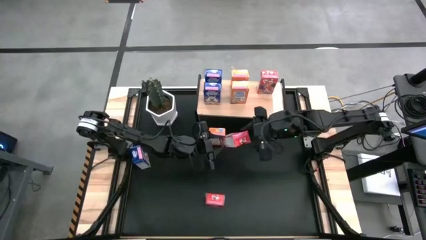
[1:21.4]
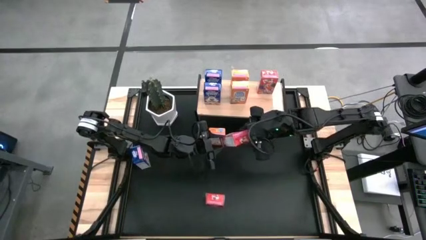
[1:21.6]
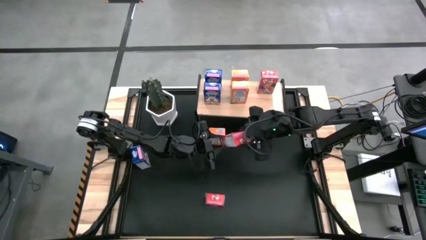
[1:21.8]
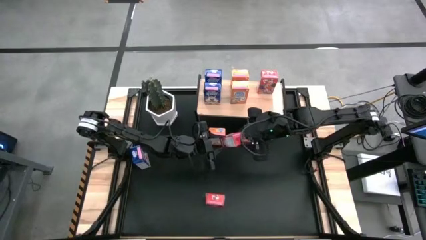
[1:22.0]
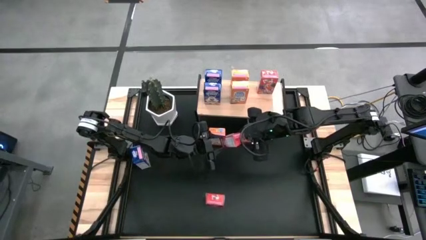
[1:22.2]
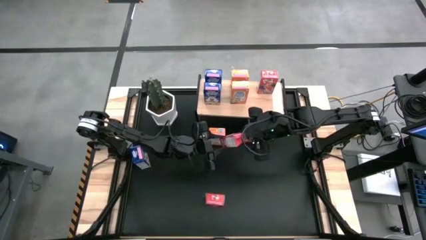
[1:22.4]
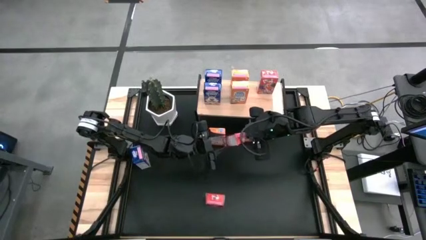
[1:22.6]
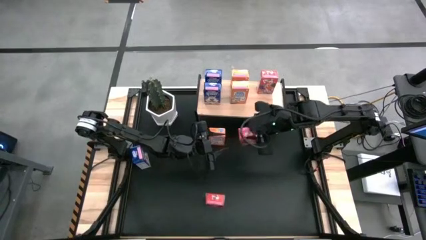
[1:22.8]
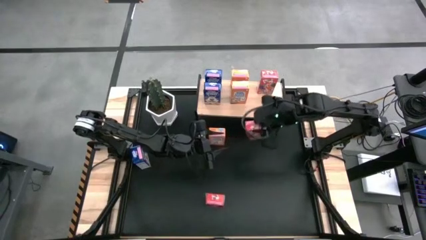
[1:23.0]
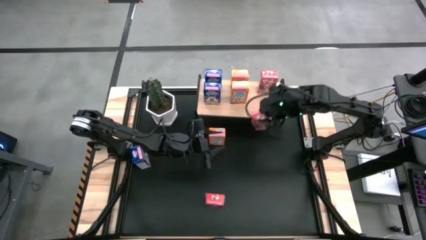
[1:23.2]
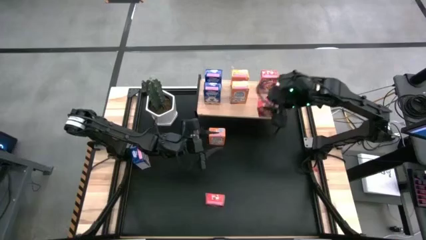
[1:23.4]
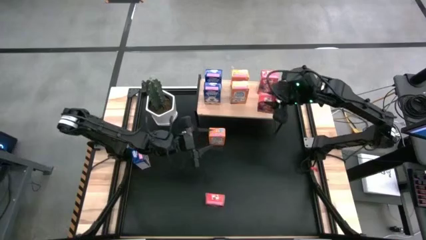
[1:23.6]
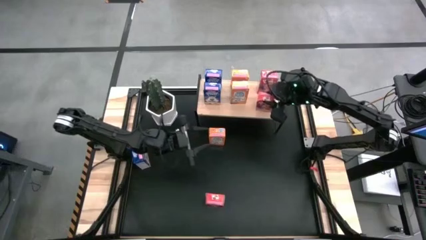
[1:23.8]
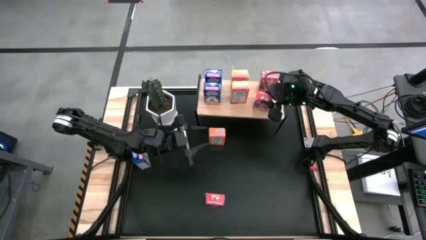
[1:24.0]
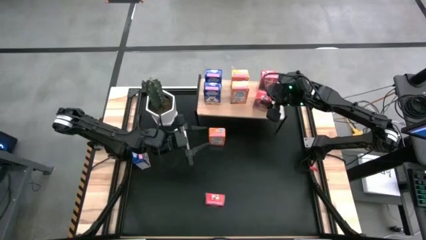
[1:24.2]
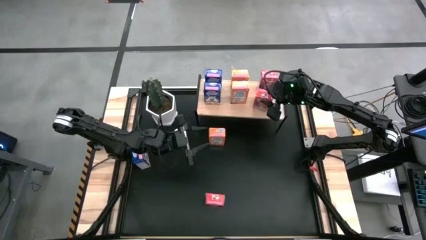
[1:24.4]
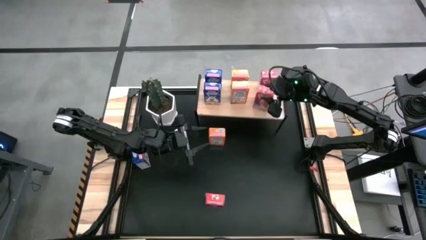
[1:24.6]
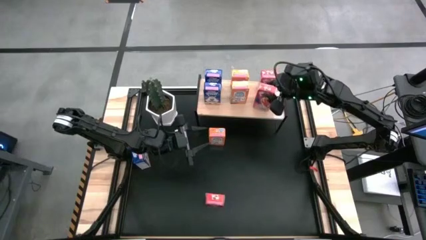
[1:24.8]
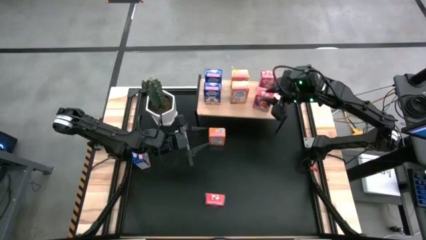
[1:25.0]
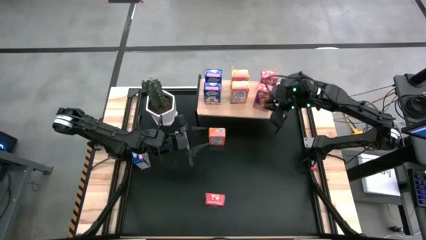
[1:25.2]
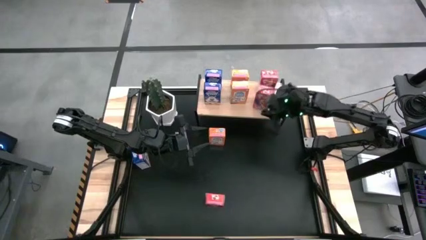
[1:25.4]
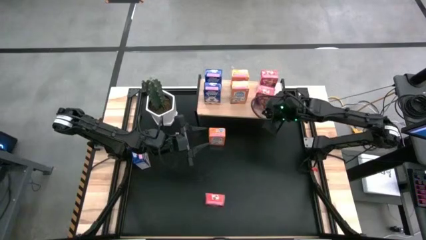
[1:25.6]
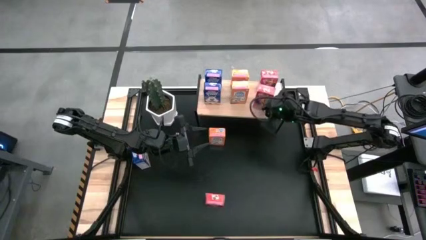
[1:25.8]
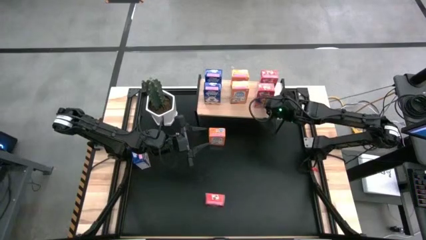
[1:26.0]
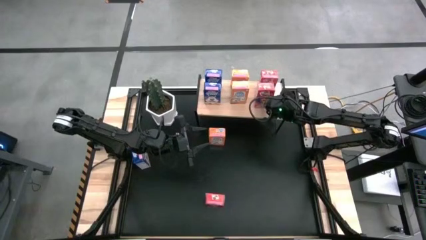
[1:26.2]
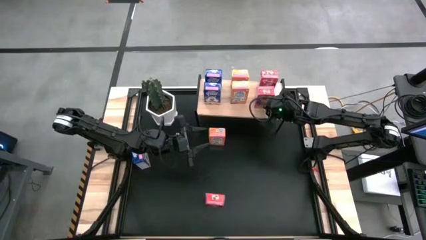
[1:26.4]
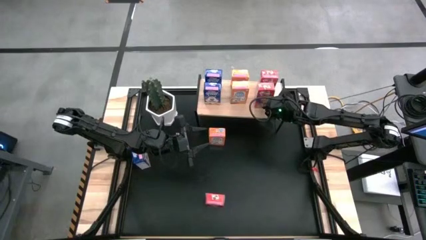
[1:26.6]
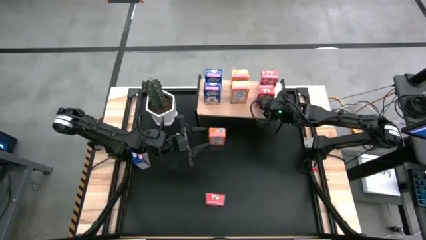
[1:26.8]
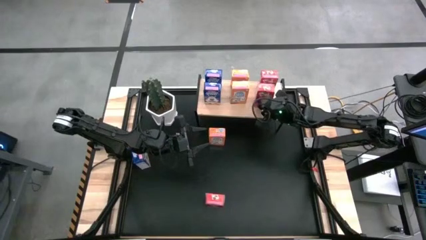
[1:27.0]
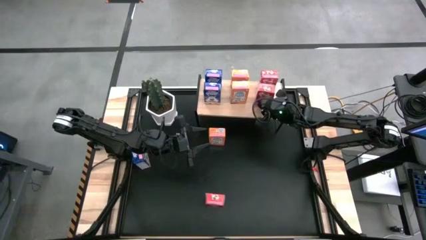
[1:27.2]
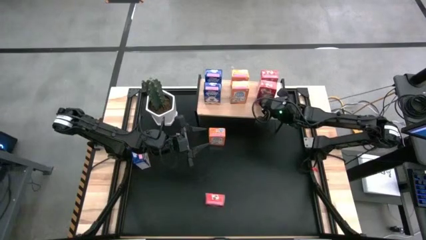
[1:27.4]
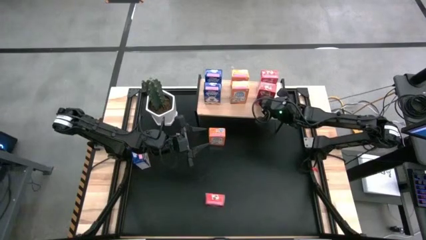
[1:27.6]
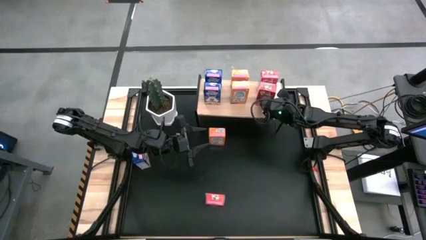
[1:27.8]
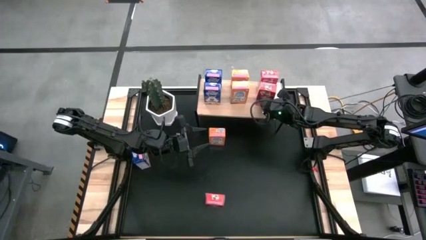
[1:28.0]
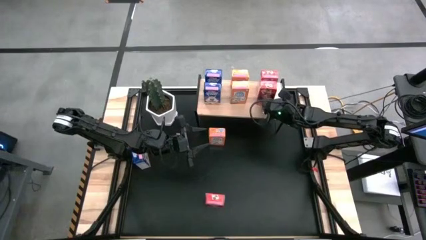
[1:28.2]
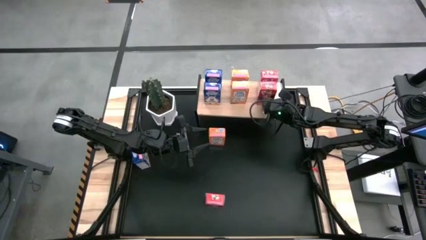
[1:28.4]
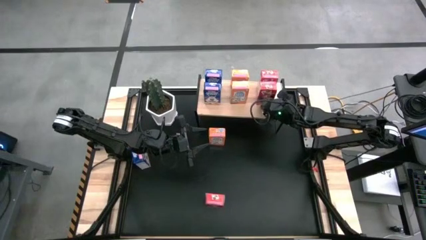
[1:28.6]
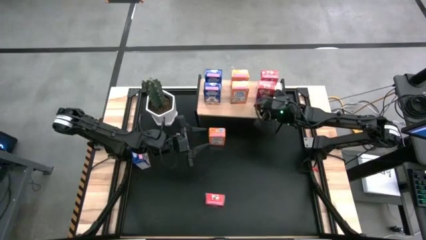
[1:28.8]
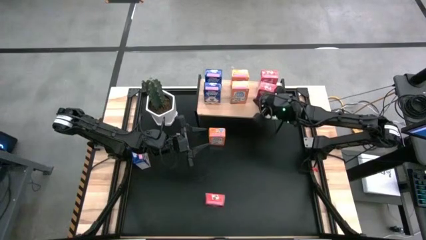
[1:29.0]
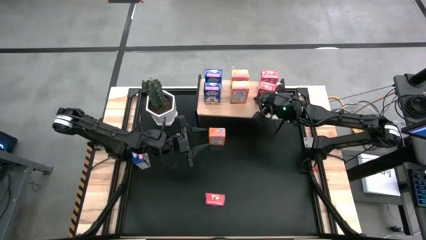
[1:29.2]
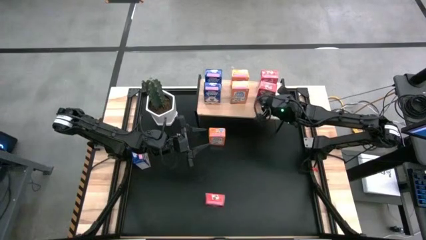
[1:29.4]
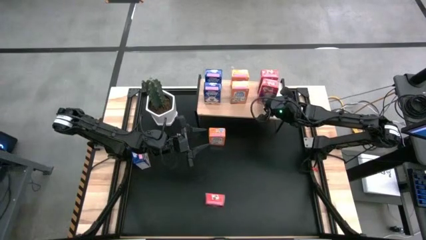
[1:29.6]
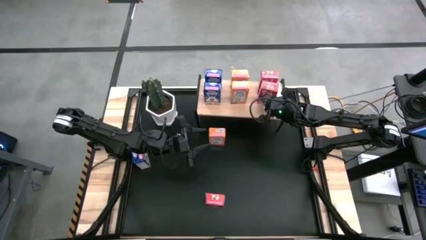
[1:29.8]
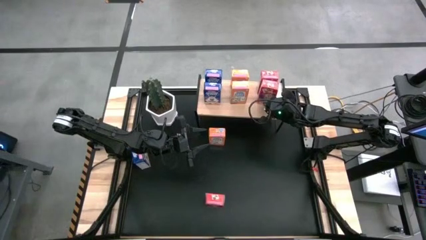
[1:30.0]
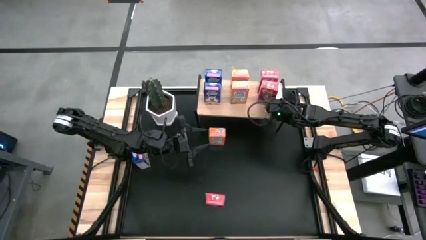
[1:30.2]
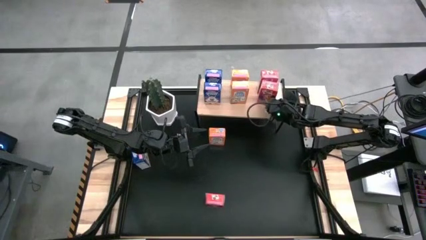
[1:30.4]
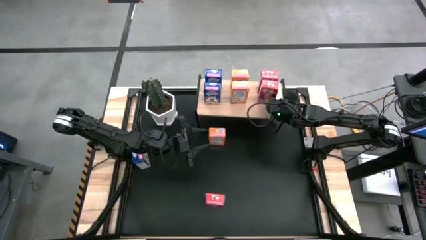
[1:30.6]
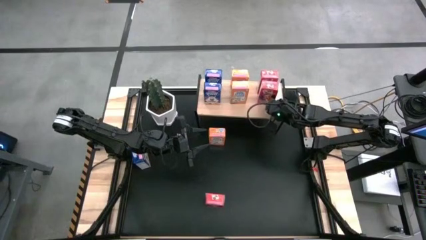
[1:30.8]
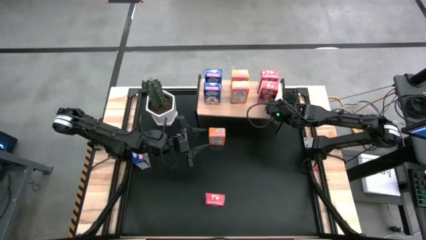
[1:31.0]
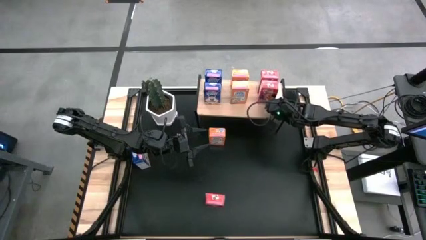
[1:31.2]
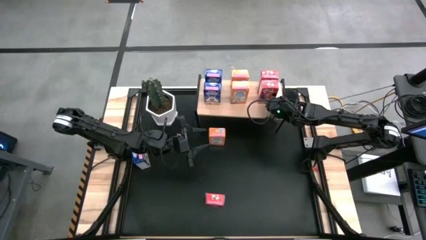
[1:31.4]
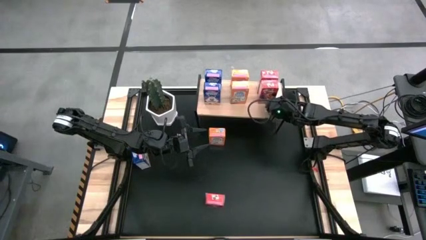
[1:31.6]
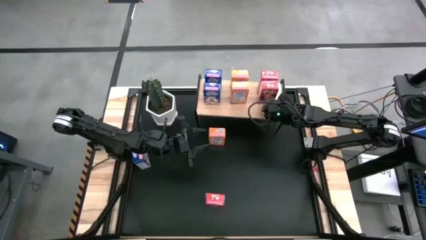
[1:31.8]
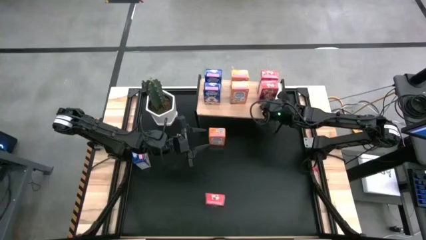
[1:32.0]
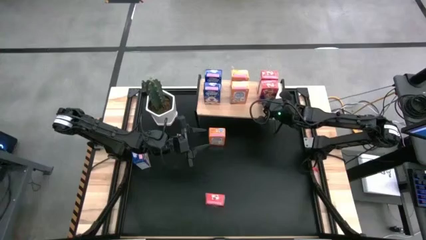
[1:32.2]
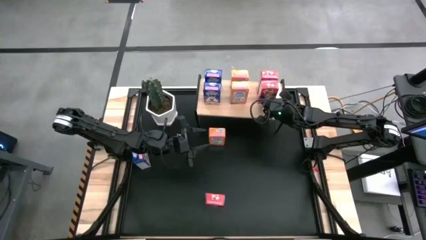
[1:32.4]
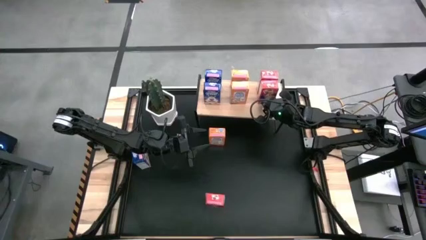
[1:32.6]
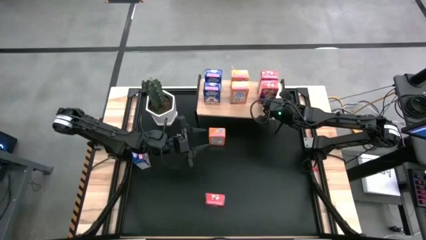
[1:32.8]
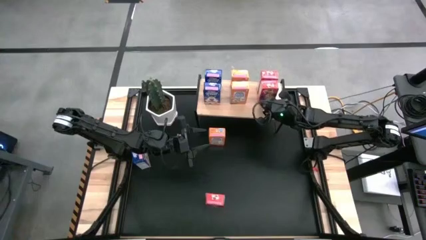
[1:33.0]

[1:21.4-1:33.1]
Task: Stack cereal on shelf
Put the left red cereal box on the shelf

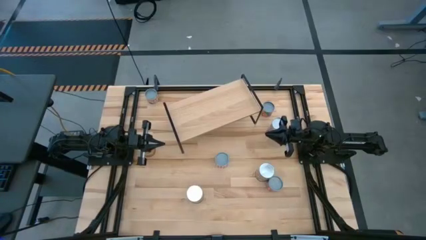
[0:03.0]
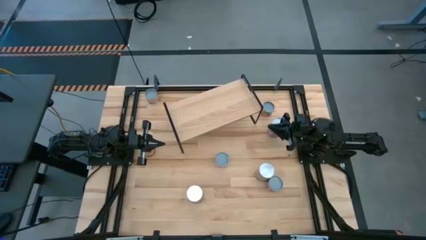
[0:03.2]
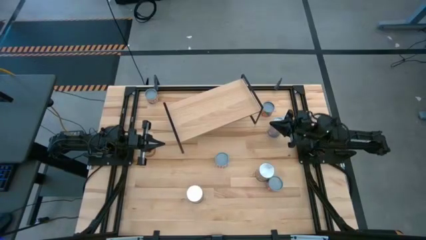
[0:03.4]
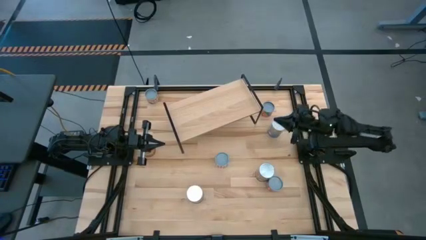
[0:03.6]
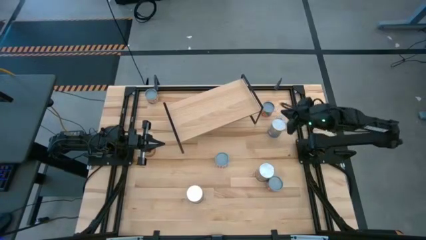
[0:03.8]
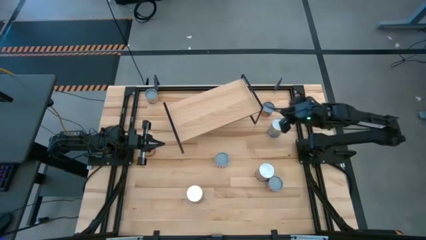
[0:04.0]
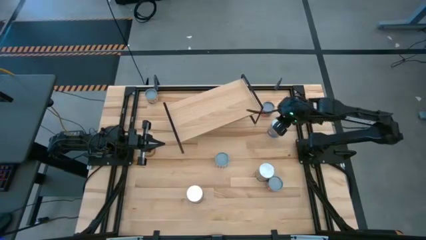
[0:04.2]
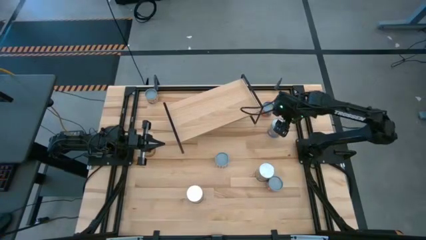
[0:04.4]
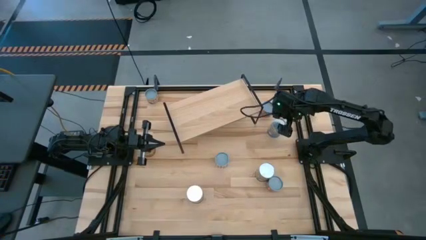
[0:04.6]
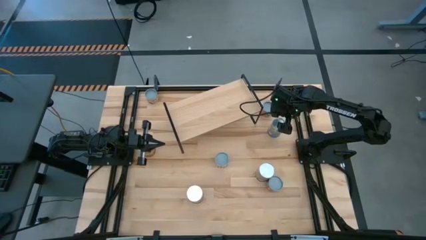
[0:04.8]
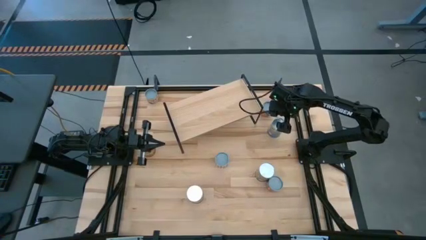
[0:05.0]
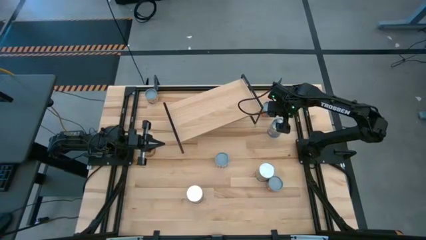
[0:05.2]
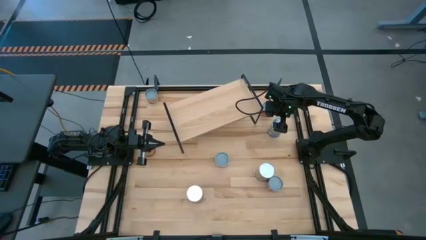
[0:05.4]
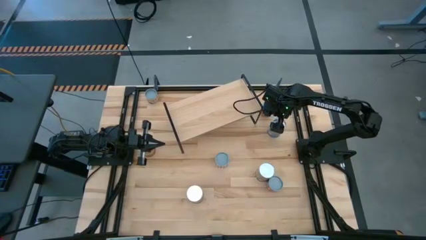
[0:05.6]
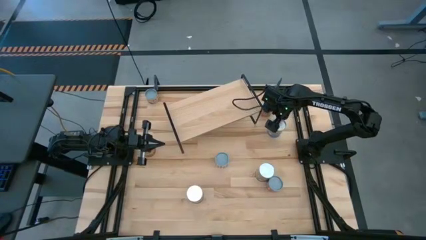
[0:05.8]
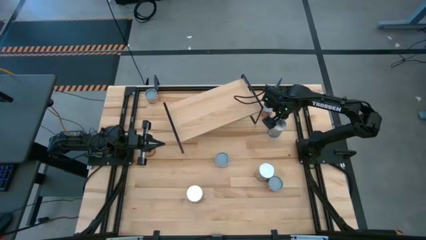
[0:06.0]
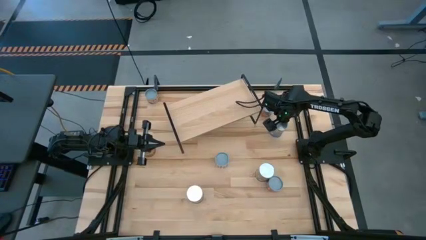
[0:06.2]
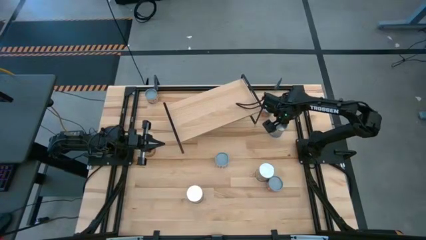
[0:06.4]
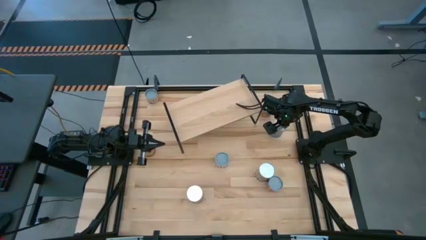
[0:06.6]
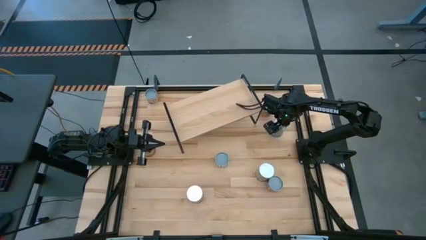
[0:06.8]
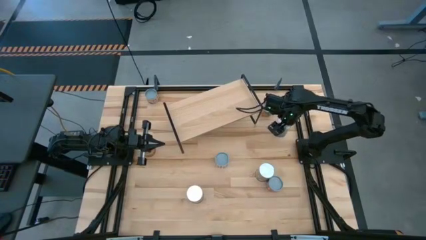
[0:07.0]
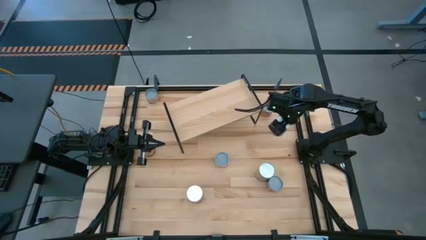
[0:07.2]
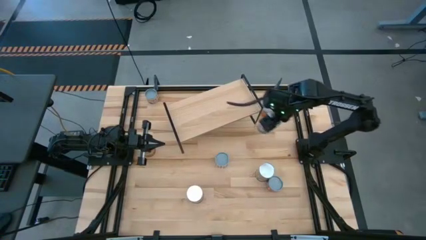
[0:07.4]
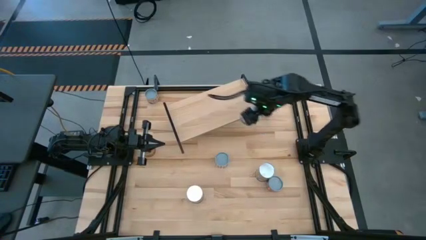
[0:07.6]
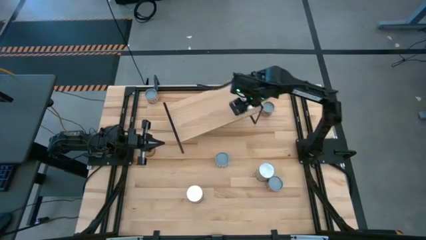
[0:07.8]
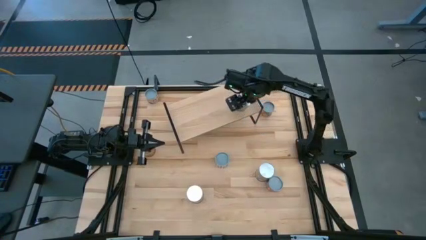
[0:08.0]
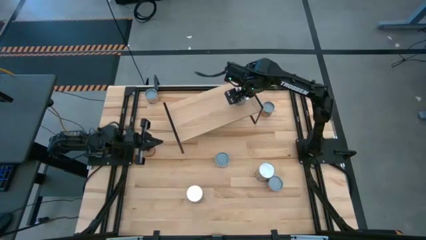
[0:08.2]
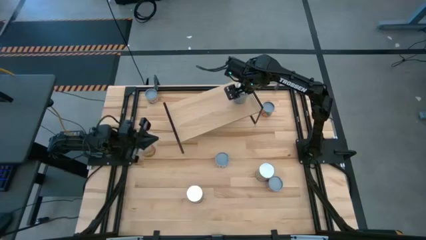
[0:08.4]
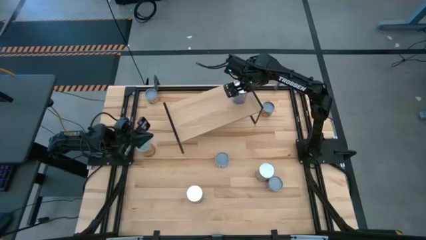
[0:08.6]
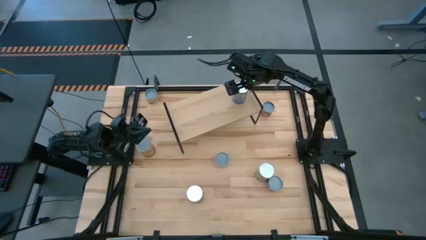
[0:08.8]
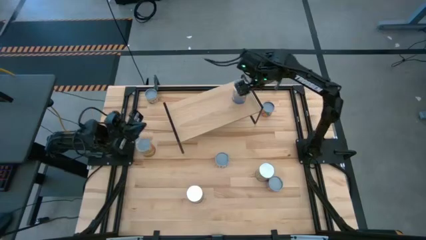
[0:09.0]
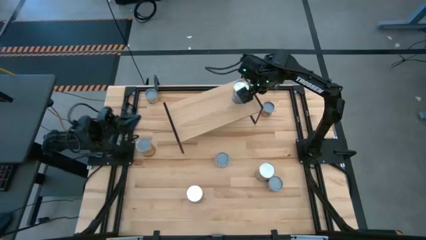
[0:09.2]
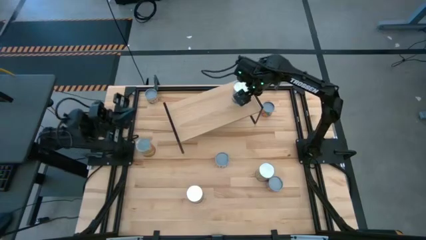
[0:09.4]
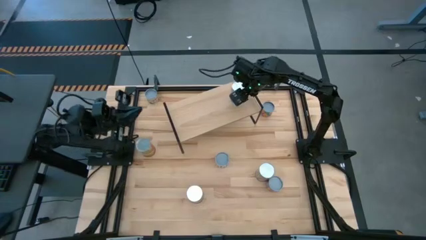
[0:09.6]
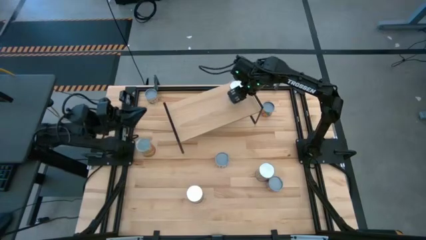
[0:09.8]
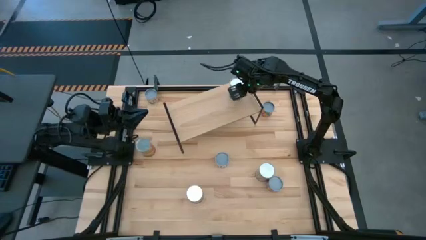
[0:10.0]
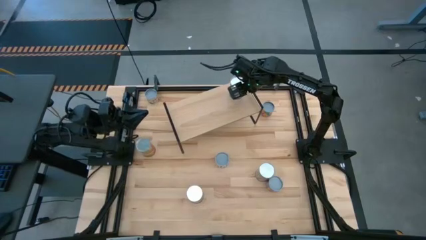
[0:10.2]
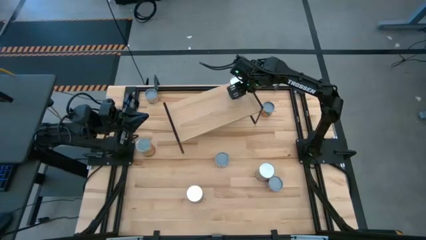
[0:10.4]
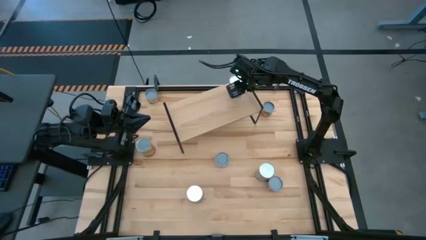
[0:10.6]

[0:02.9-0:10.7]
Task: Pick and place cans onto a shelf
Put the top canned peaches on the shelf
